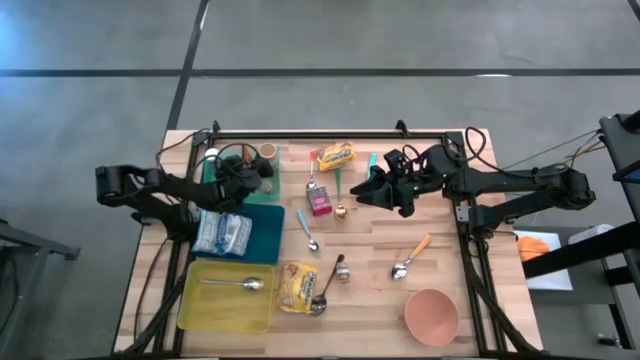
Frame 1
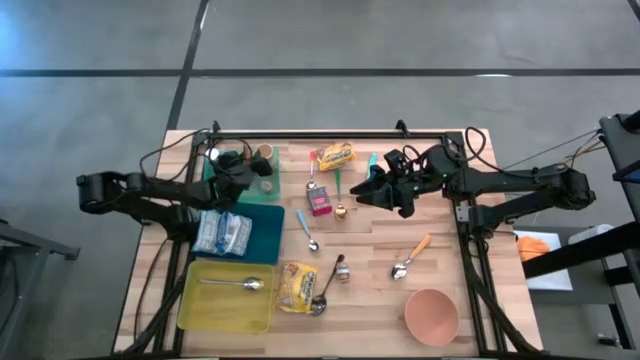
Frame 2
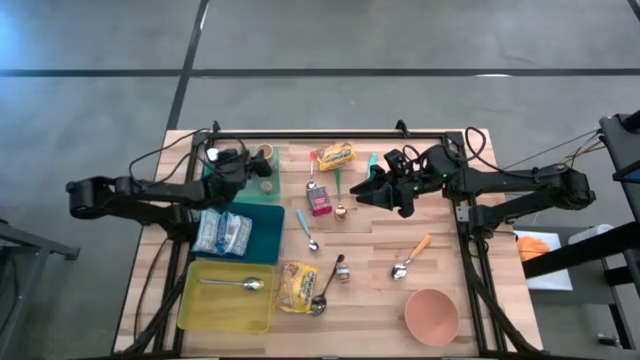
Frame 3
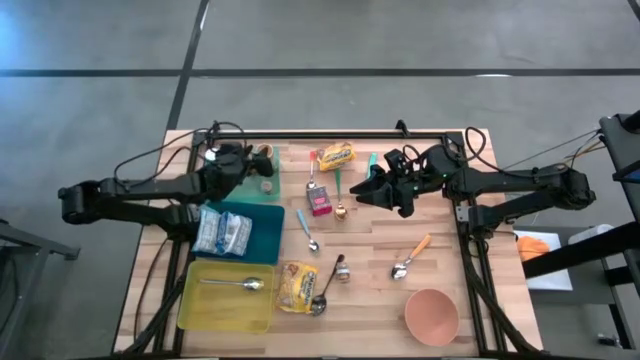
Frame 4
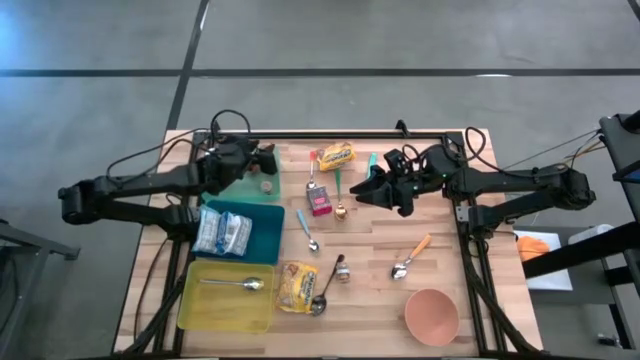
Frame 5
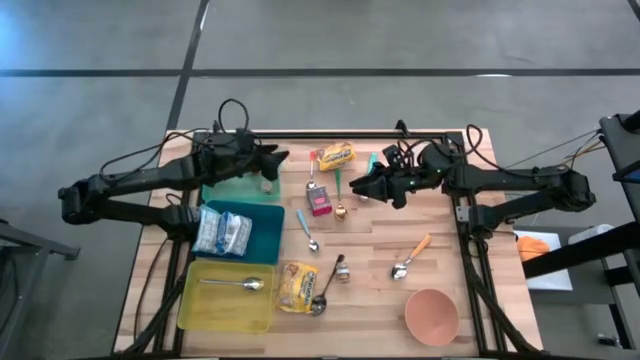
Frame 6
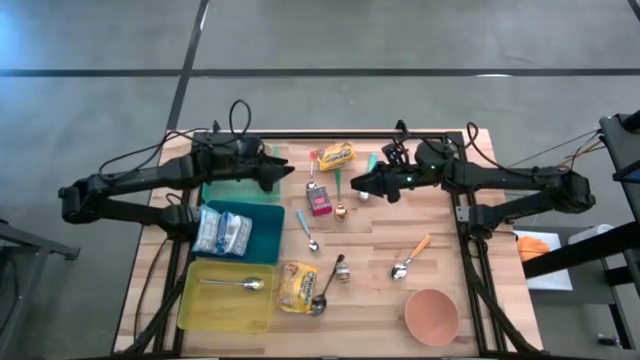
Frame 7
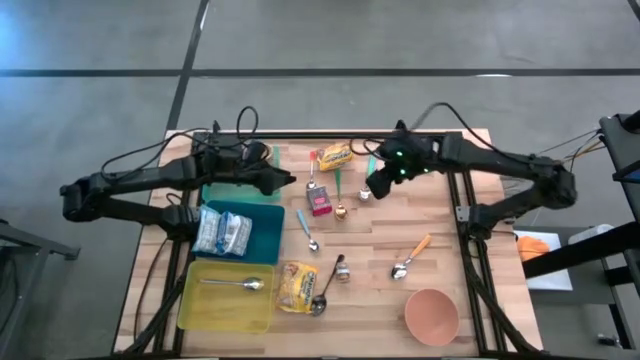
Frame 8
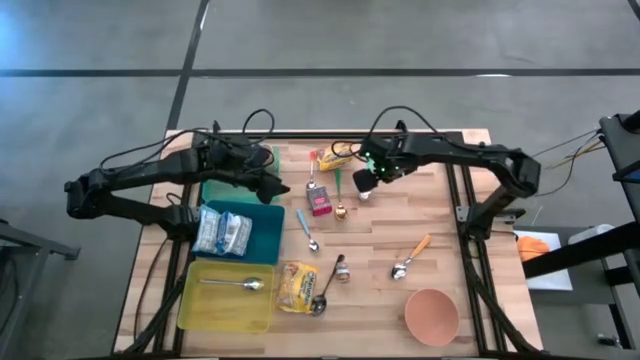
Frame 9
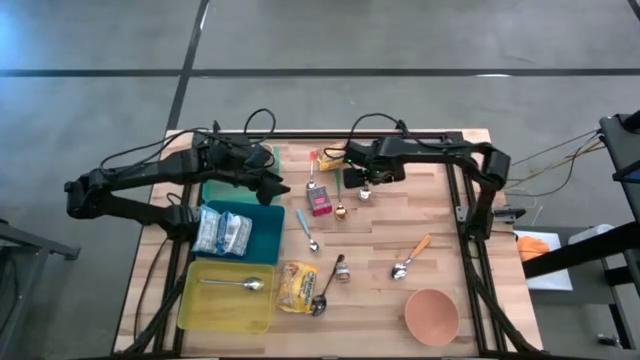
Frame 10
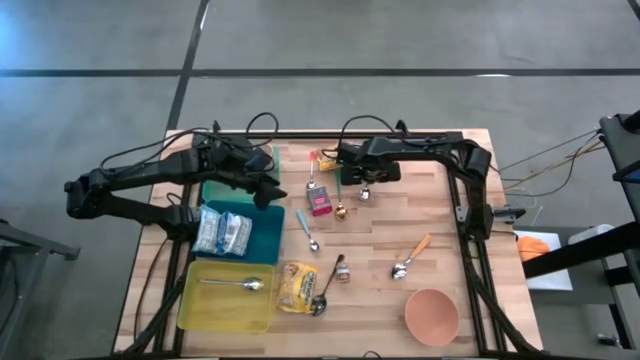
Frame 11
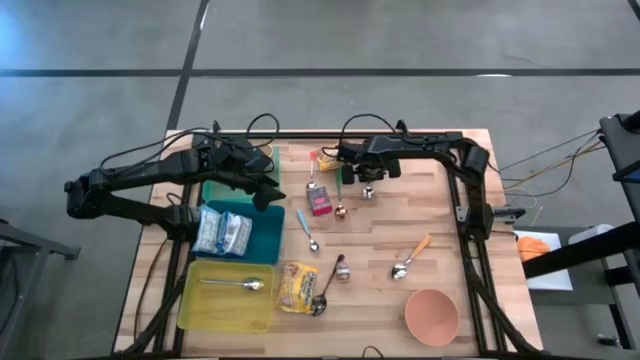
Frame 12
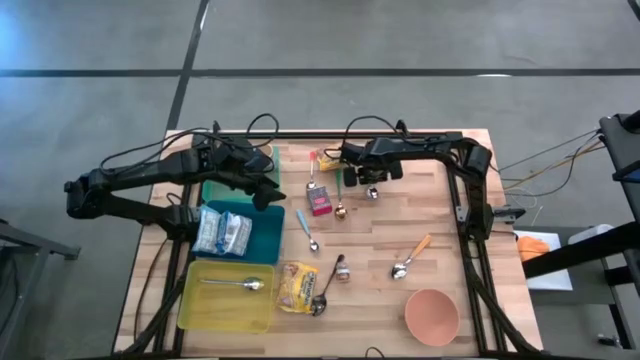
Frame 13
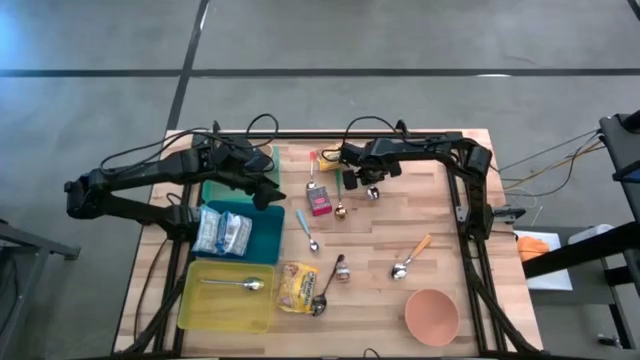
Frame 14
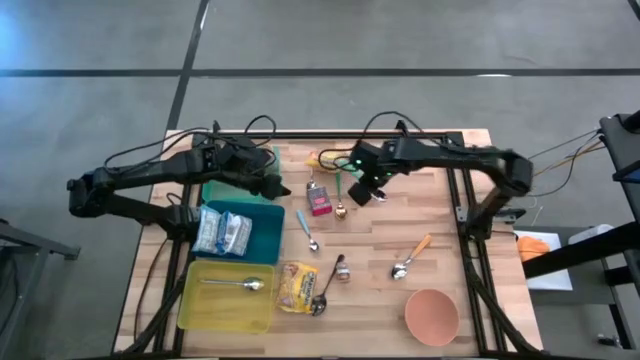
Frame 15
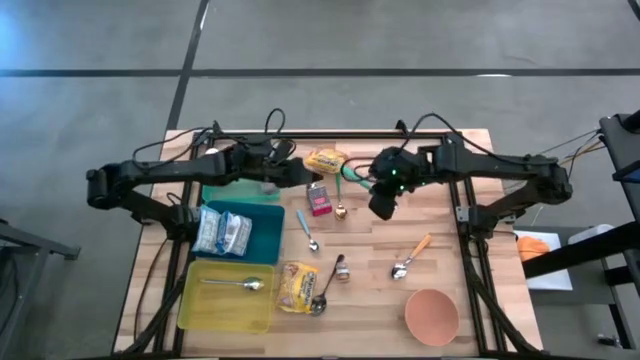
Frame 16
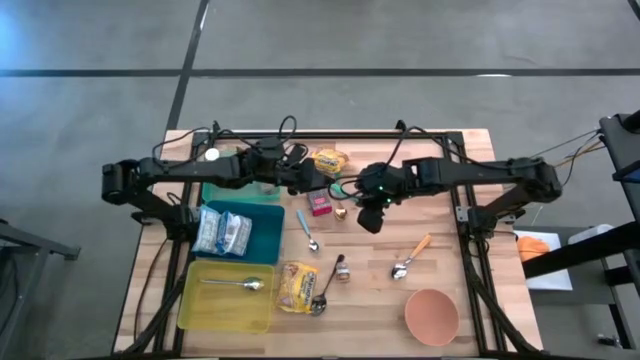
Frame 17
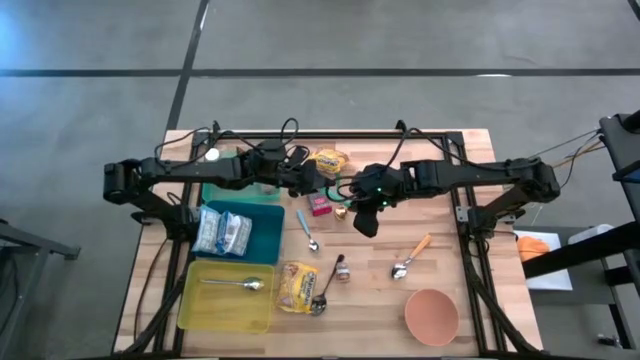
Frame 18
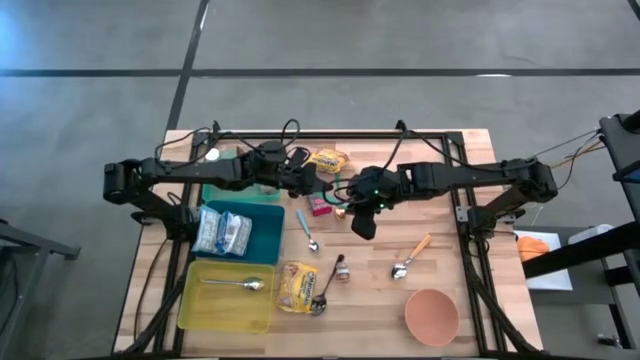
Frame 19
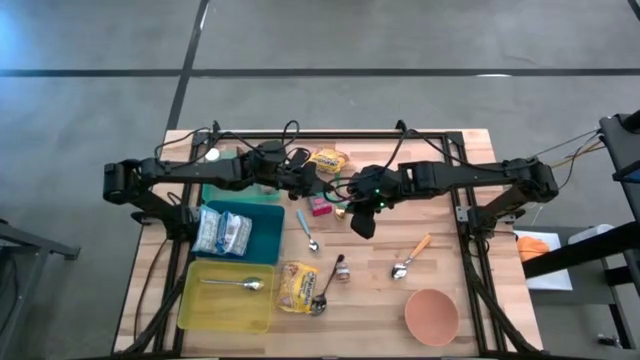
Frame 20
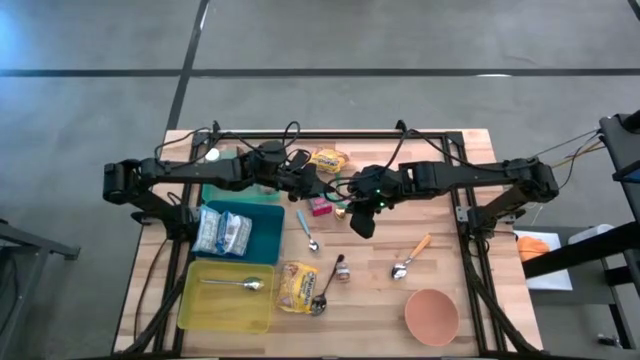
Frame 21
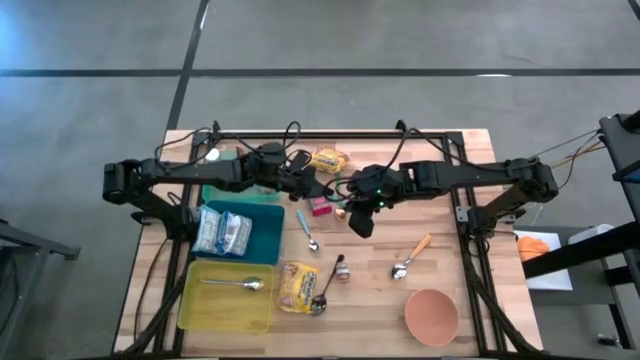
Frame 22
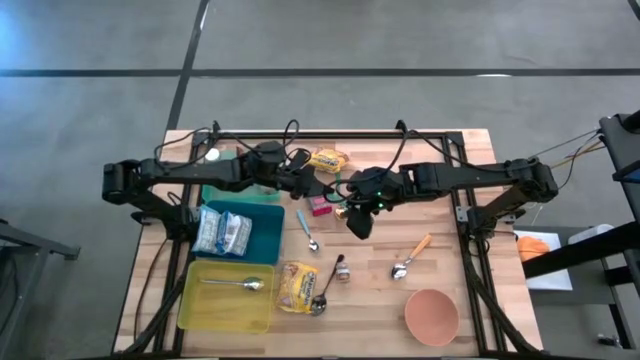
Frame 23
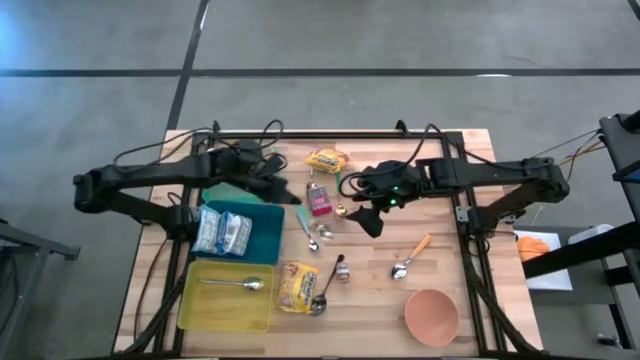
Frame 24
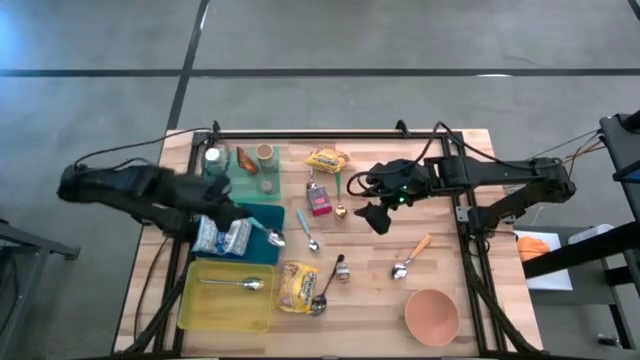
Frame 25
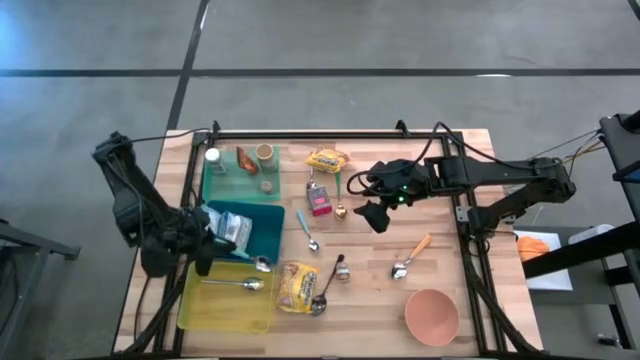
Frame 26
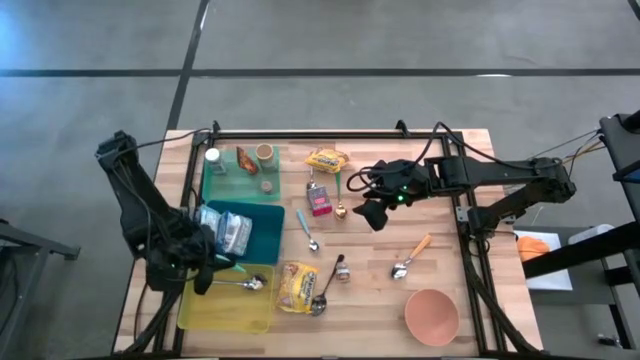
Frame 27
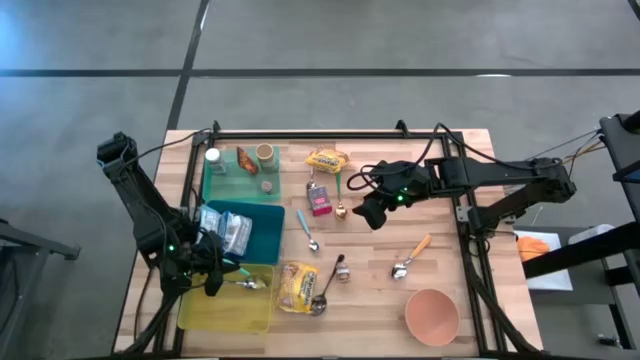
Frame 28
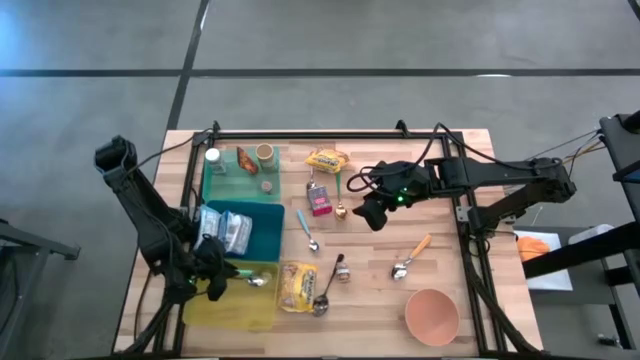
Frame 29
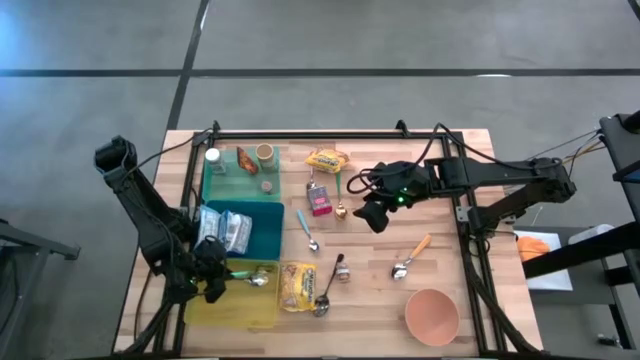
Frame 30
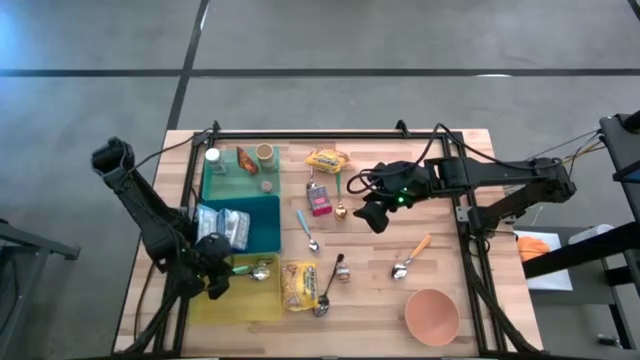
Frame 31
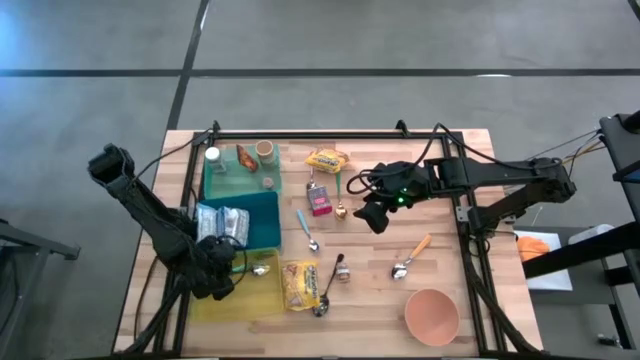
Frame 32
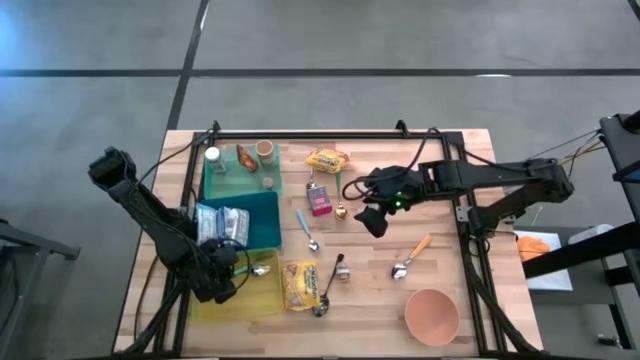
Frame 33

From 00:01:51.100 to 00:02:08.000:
Put the light green spoon into the yellow bin
